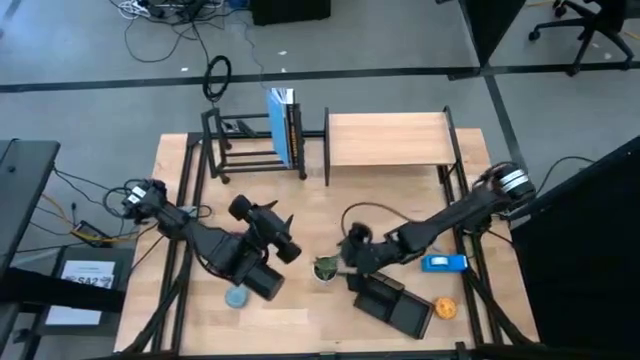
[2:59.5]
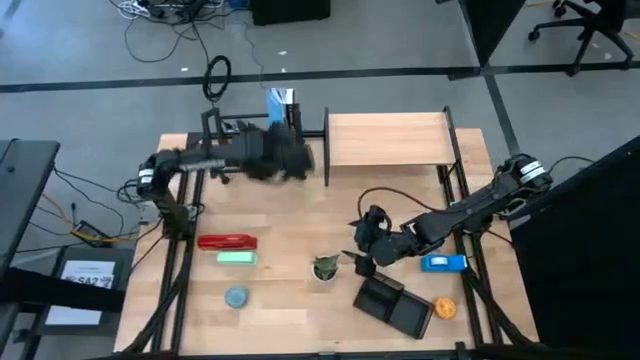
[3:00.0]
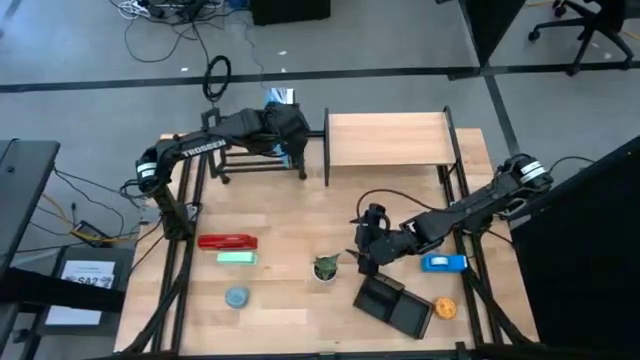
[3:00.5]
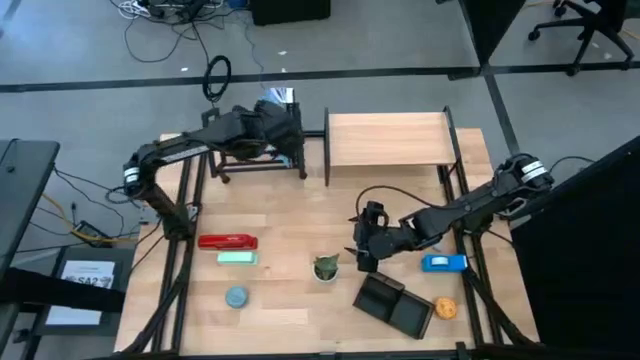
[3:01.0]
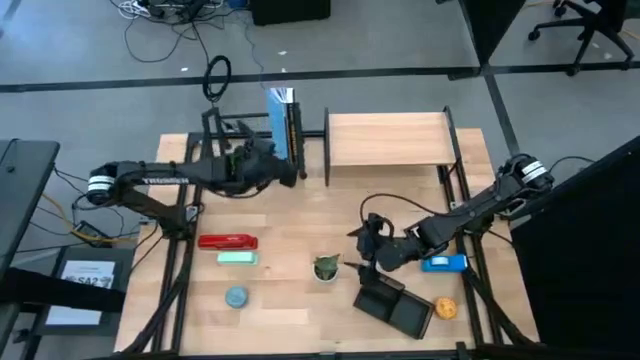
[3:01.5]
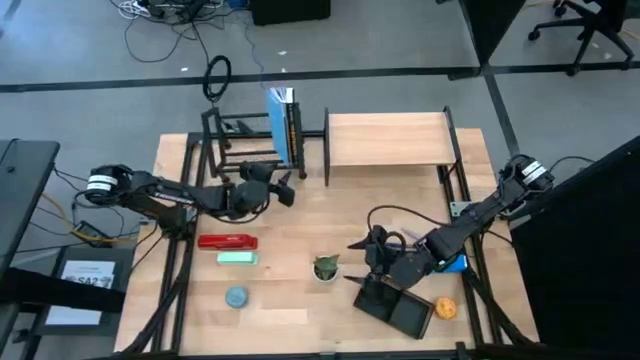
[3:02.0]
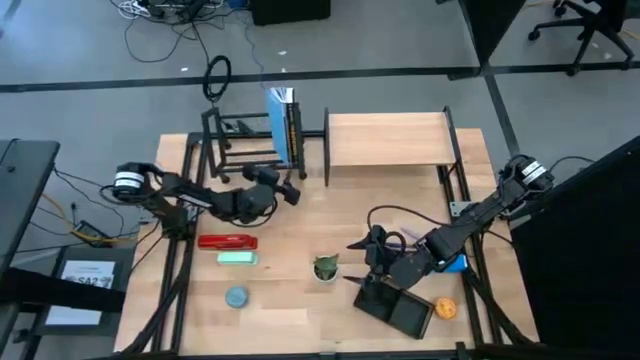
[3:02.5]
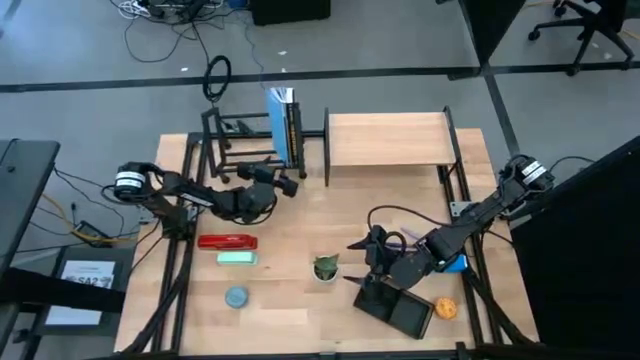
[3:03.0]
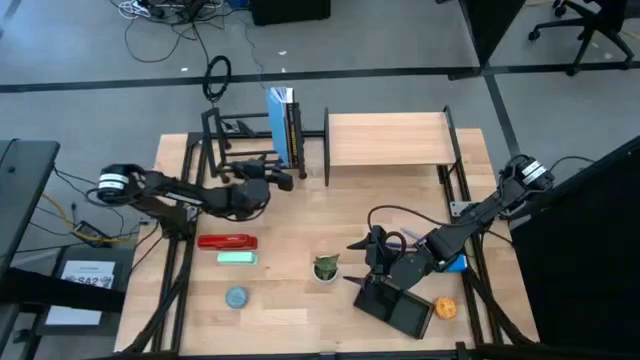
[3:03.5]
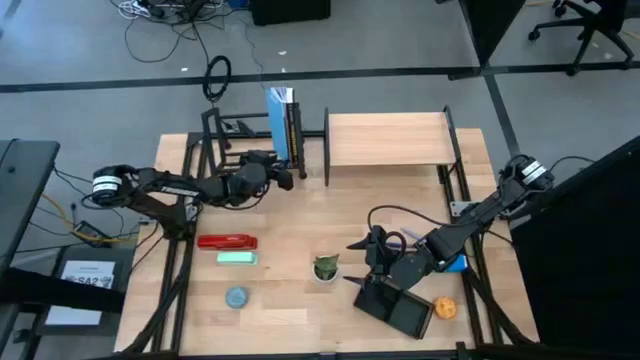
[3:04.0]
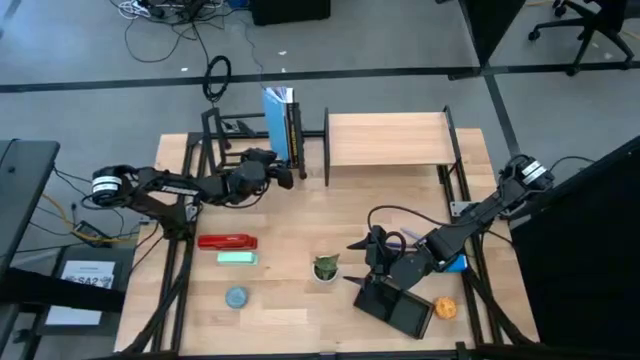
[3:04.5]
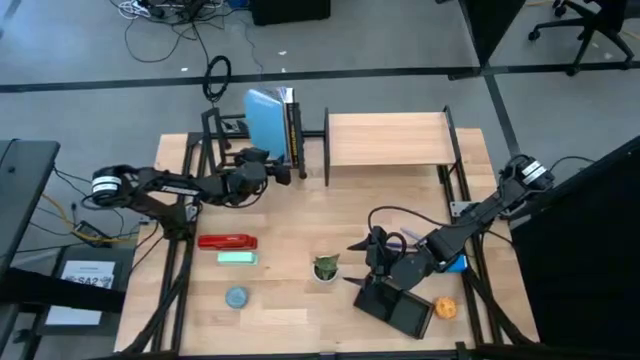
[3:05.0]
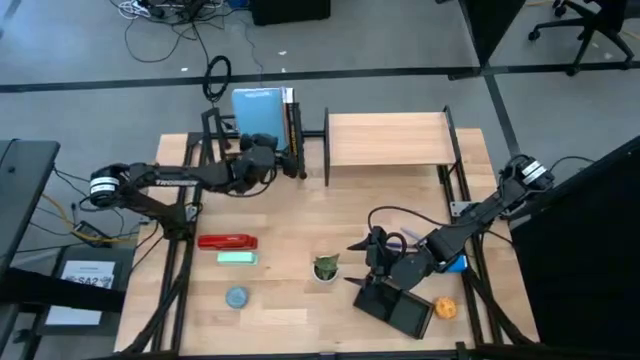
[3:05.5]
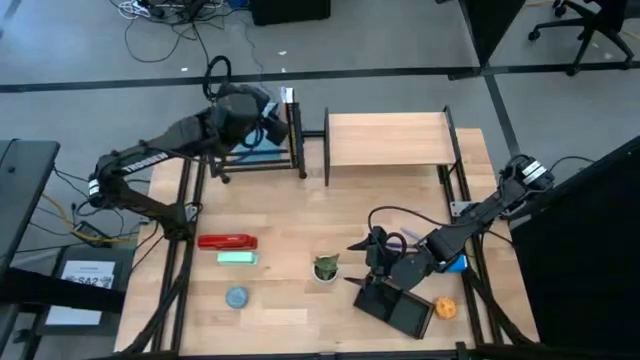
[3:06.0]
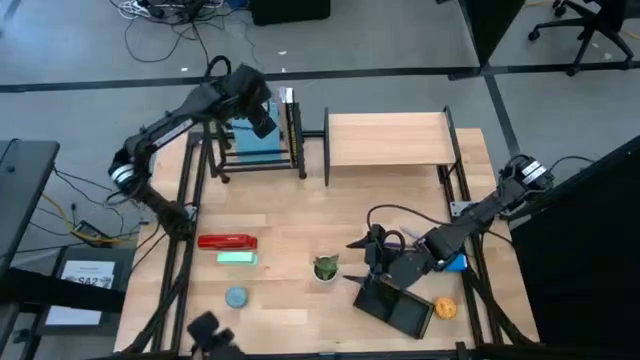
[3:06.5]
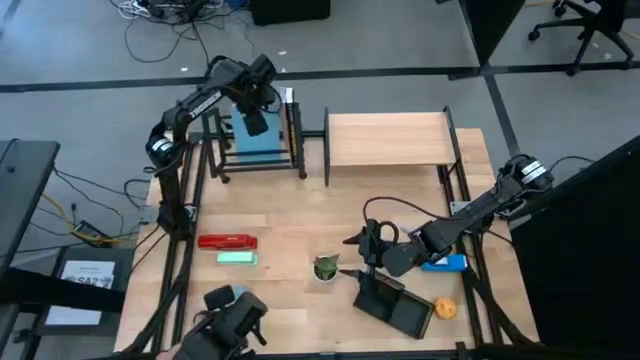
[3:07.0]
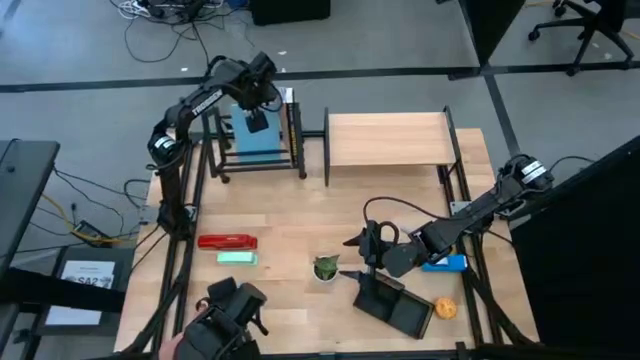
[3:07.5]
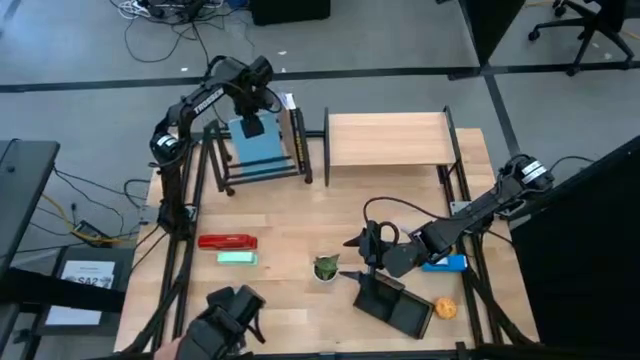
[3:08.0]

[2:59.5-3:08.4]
Task: Stock shelves
Remove the blue book from the book organizer

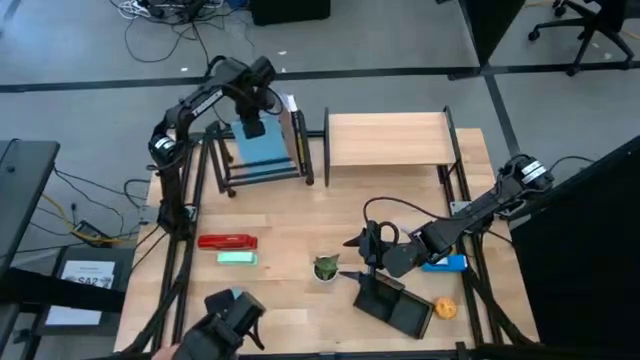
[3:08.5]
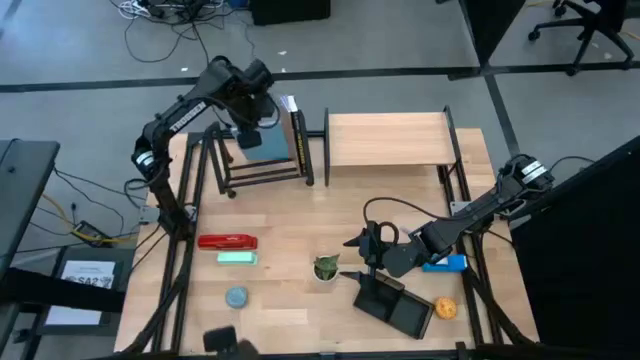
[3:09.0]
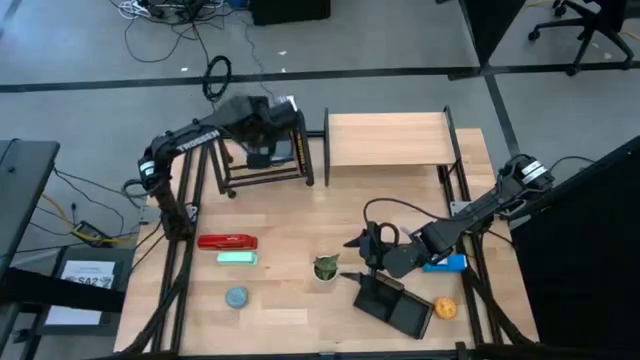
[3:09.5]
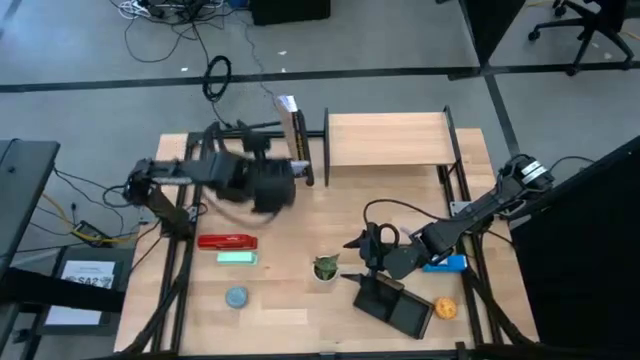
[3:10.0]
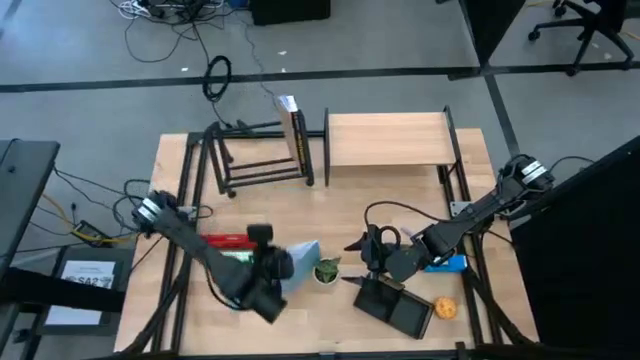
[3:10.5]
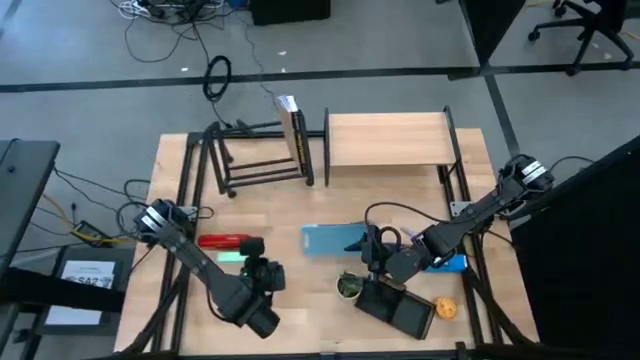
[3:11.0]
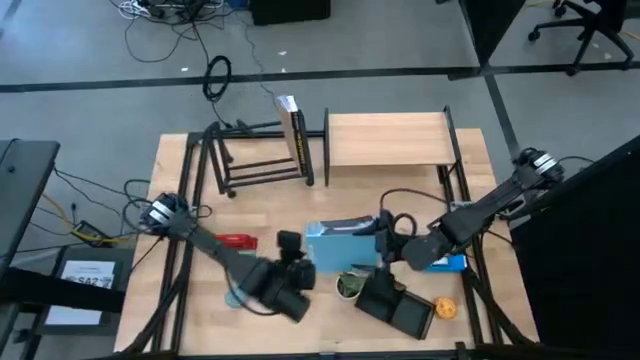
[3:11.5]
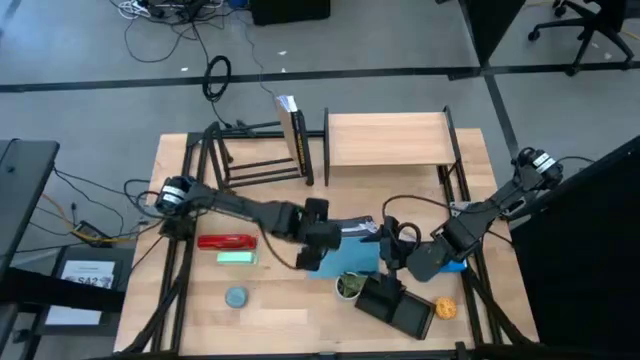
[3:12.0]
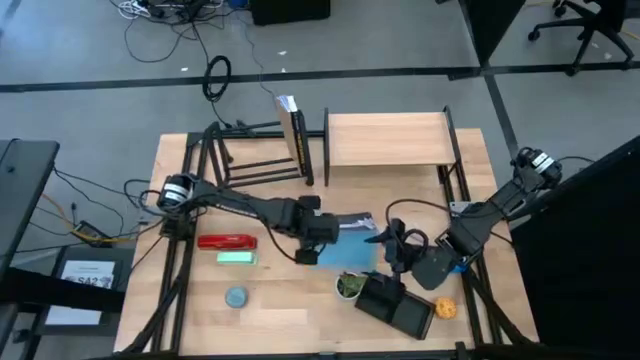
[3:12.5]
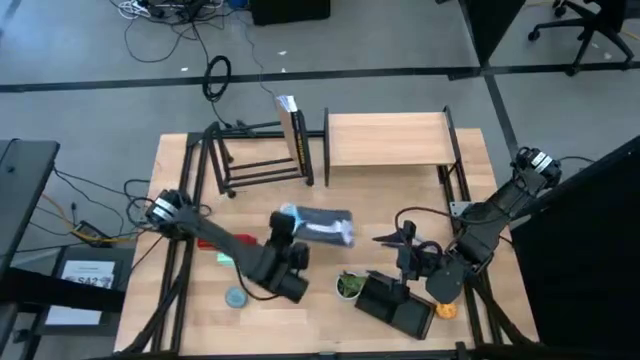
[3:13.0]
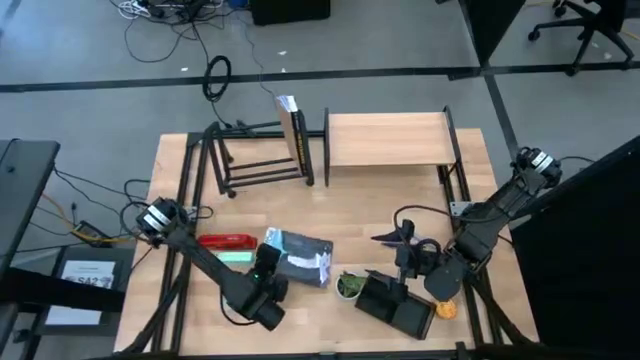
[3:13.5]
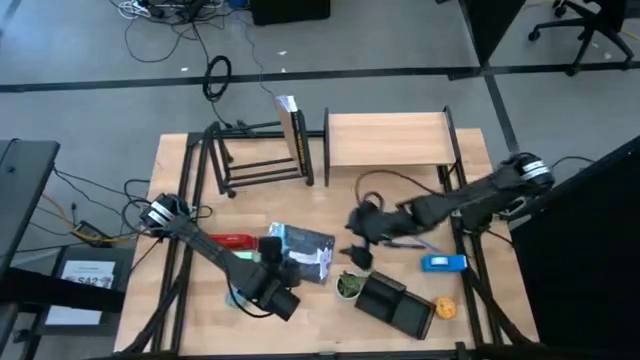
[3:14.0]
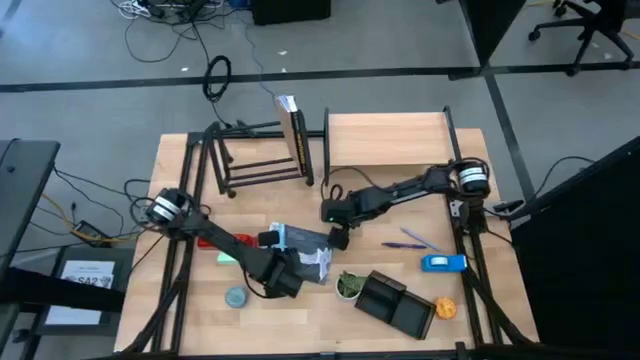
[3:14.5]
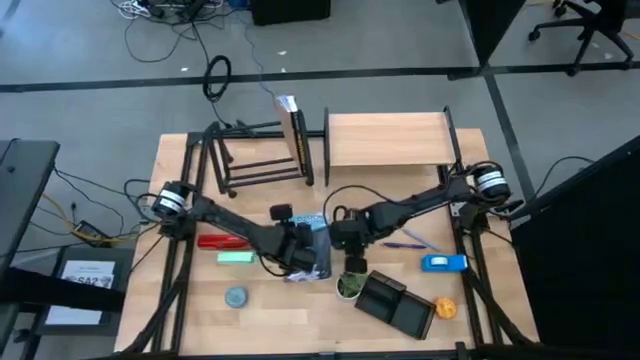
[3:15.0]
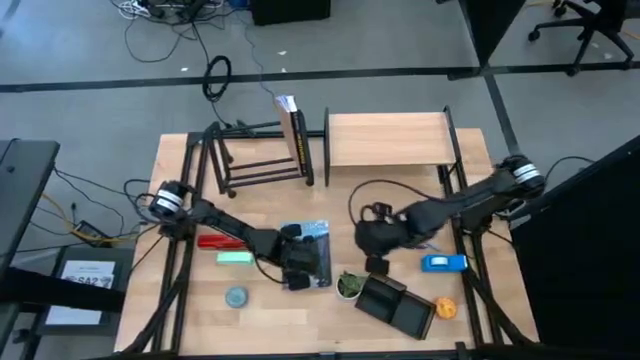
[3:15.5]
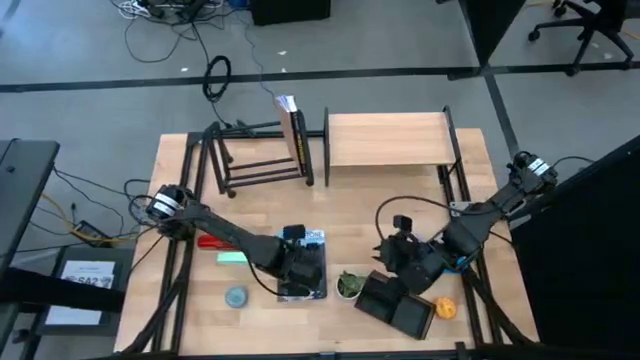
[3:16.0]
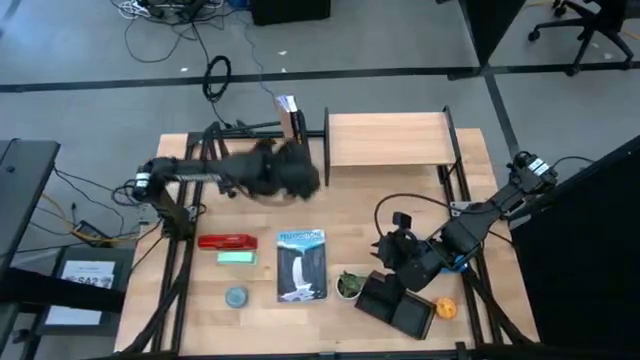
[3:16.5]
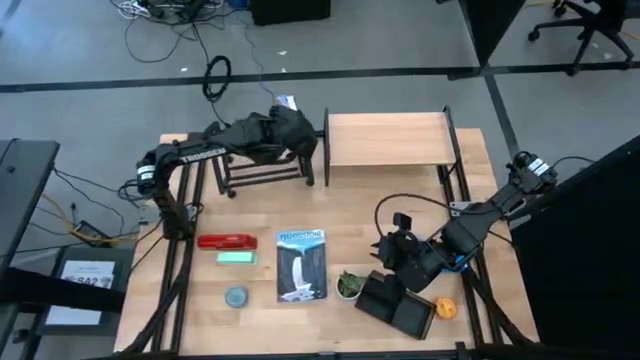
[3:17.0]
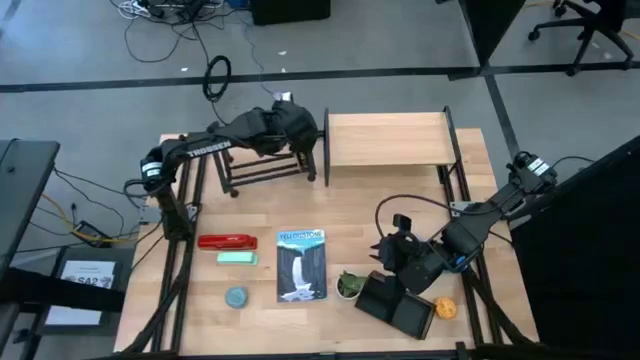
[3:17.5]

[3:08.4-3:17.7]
Remove the blue book from the book organizer

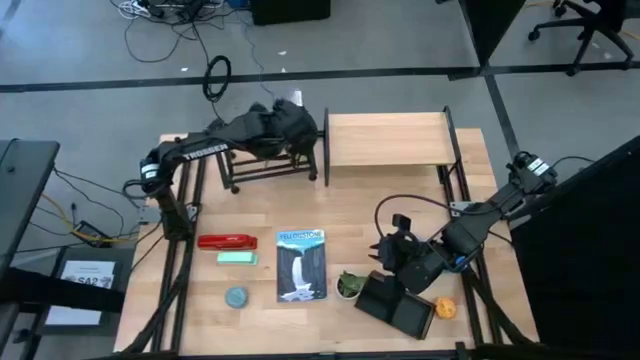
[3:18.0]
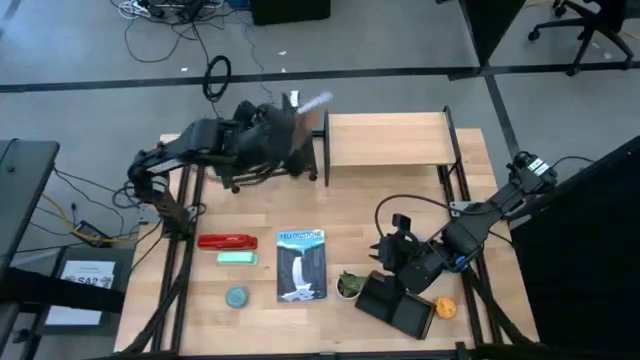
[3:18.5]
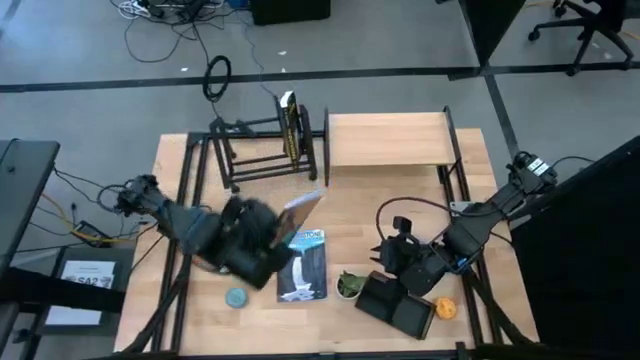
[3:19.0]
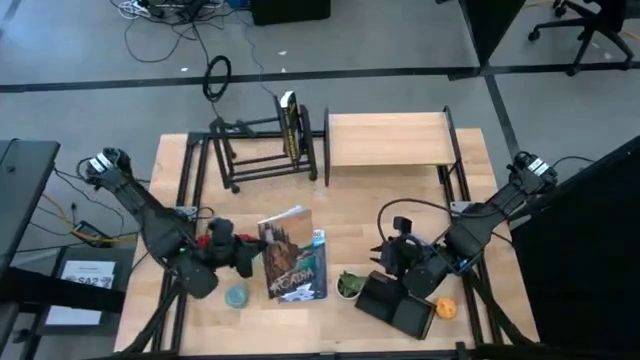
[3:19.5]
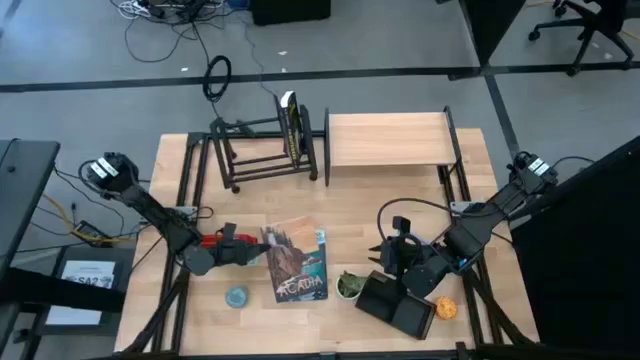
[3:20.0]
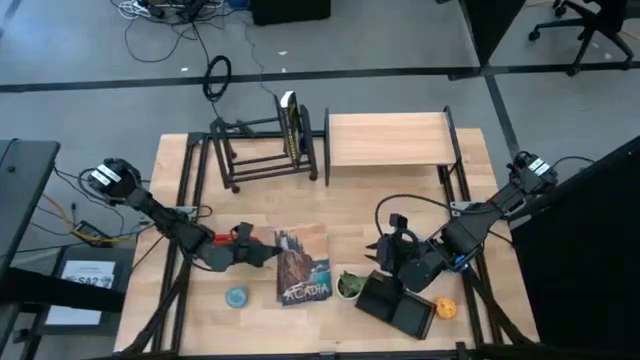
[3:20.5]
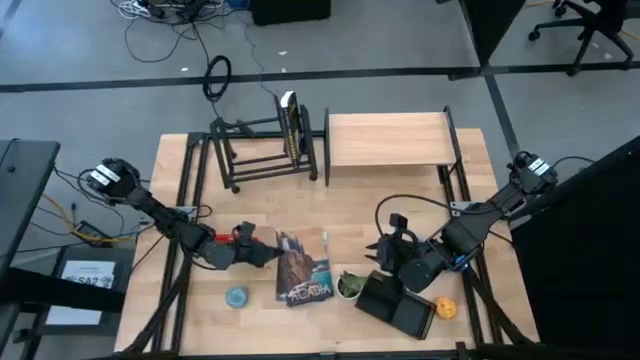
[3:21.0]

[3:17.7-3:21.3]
Remove the brown book from the book organizer
